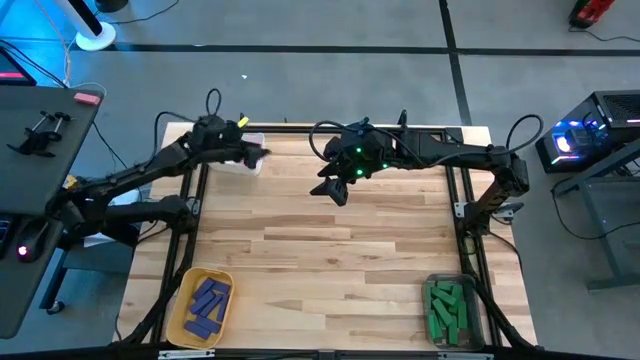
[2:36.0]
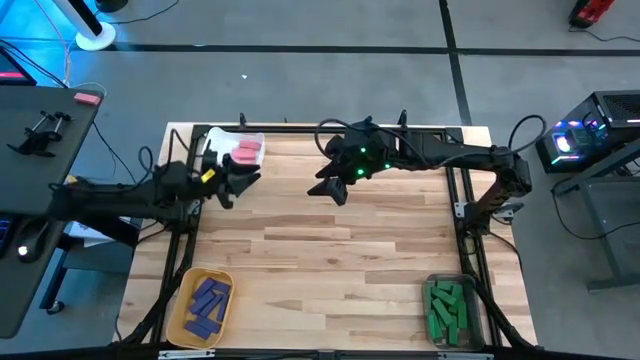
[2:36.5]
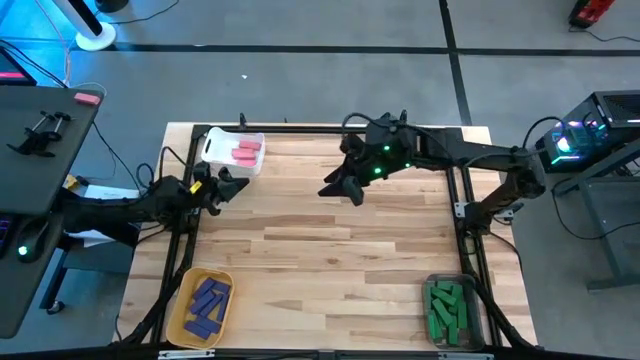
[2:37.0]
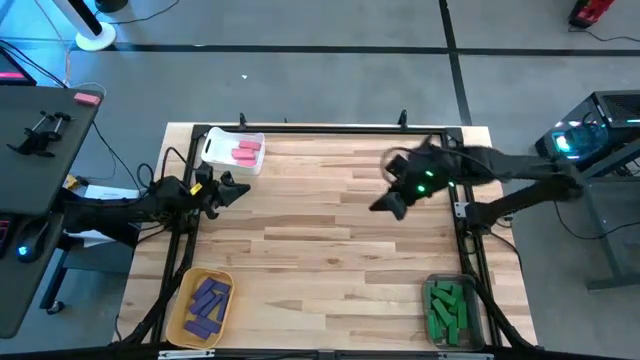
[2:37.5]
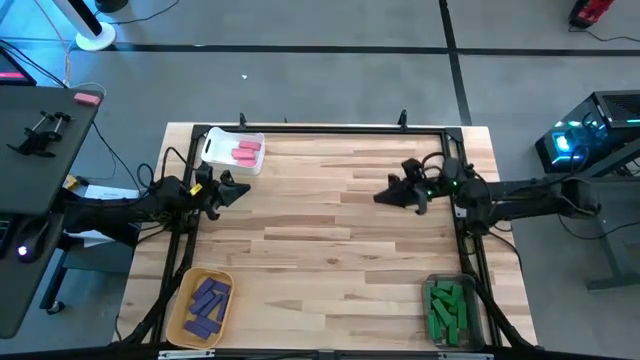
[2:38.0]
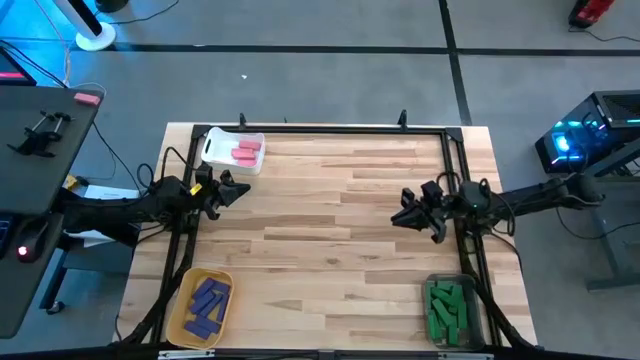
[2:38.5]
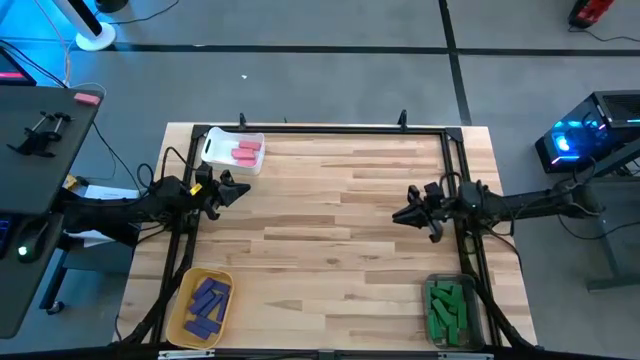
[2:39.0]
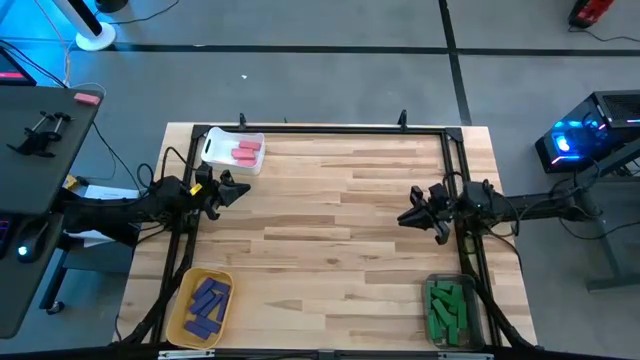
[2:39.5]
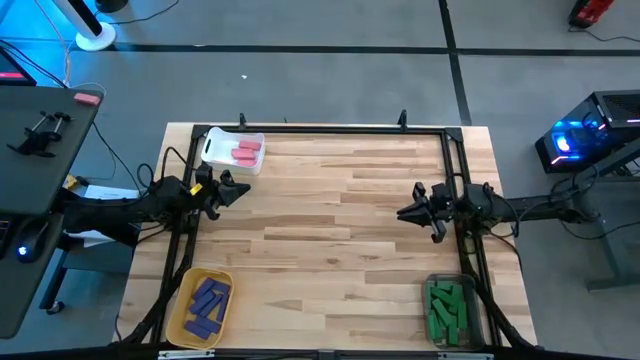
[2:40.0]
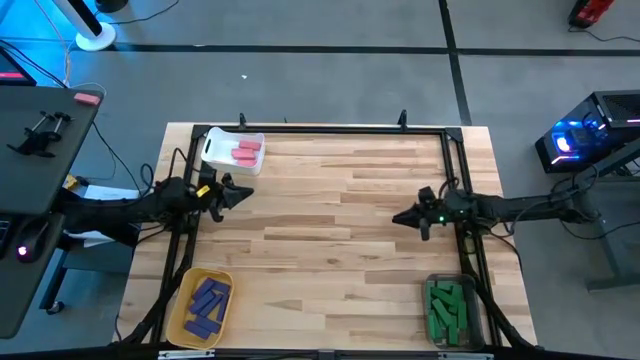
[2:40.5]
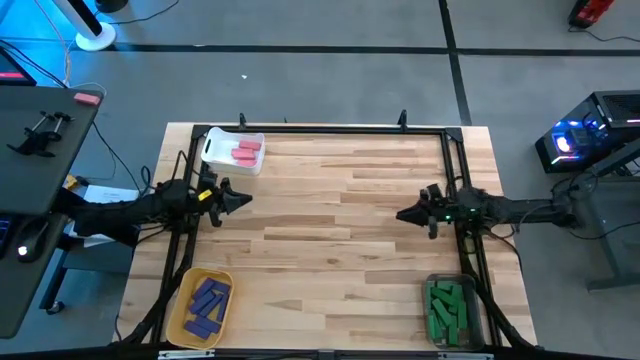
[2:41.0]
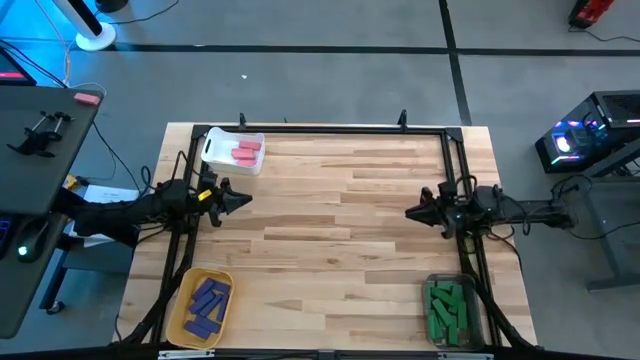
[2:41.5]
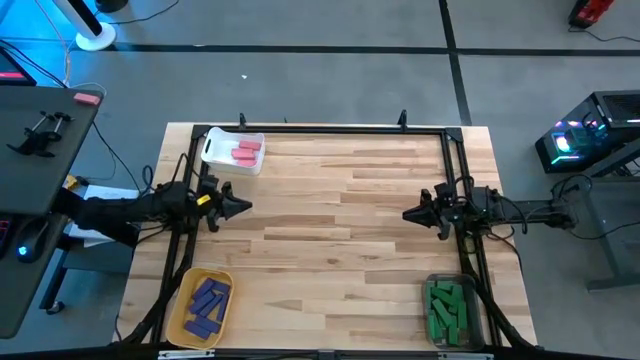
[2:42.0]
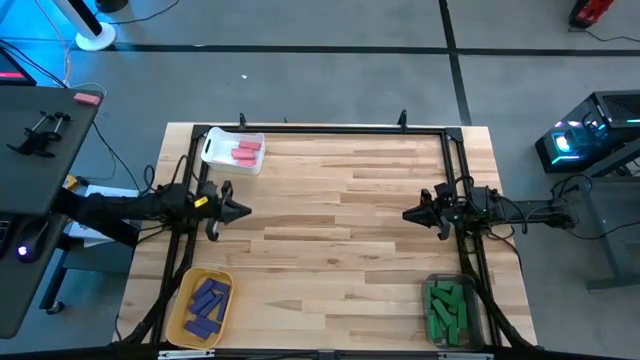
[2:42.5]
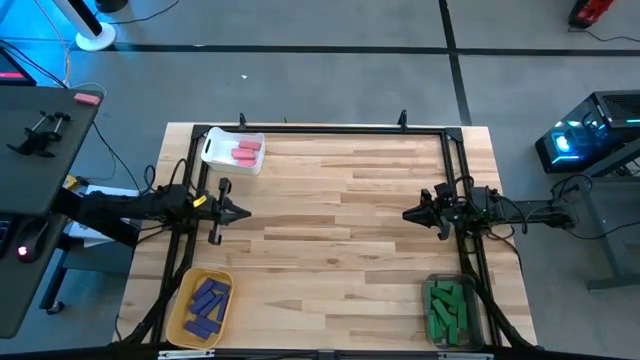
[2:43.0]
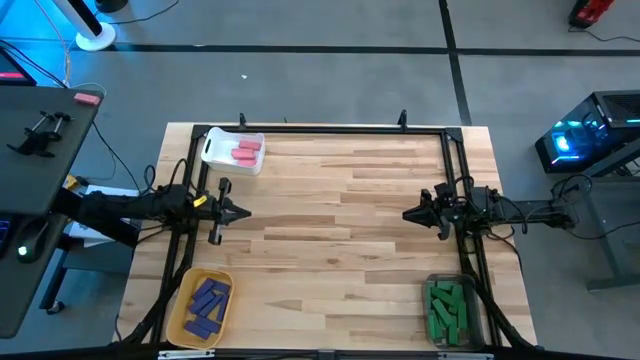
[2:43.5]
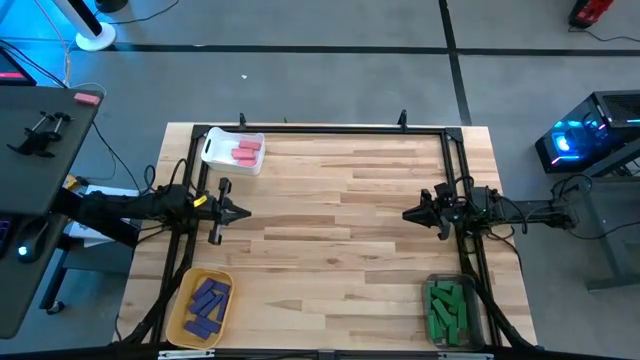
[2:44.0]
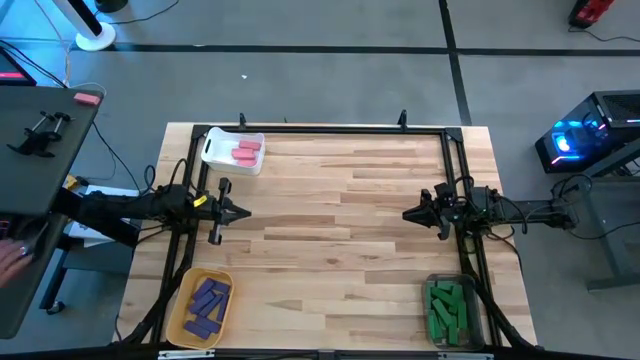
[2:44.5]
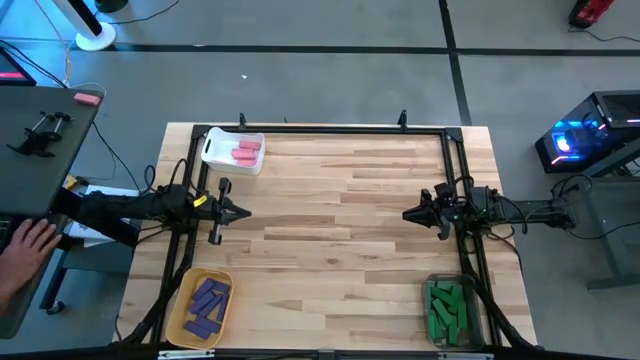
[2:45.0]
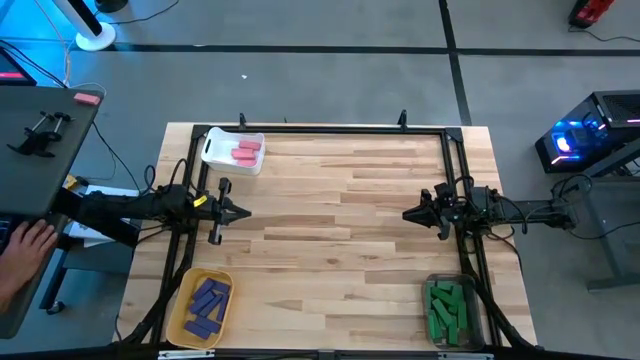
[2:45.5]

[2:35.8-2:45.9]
Task: Sort blocks
Return to Home Position

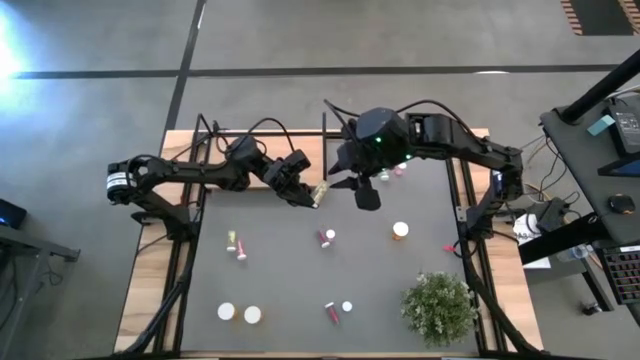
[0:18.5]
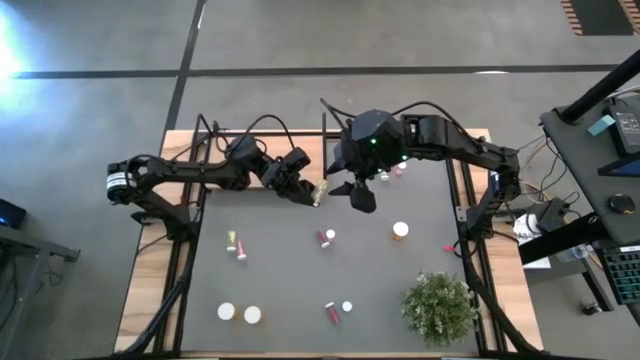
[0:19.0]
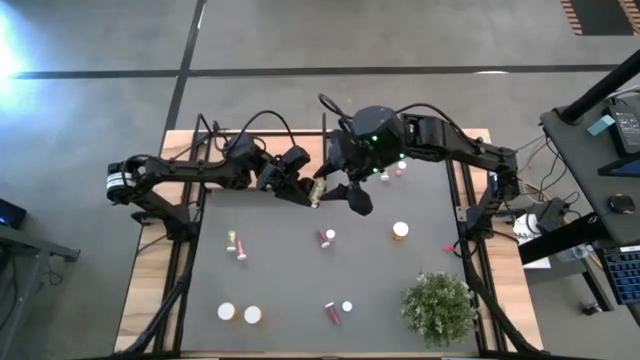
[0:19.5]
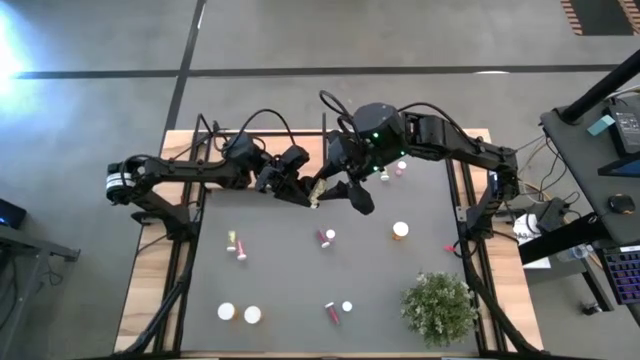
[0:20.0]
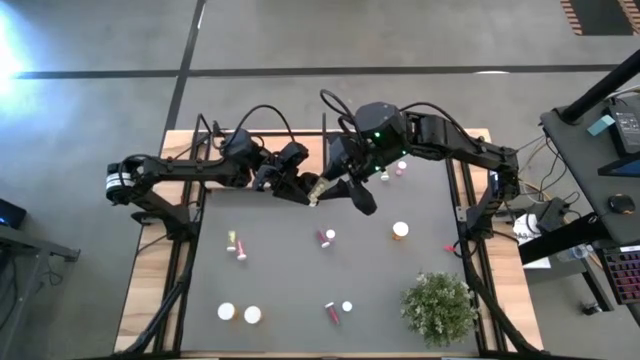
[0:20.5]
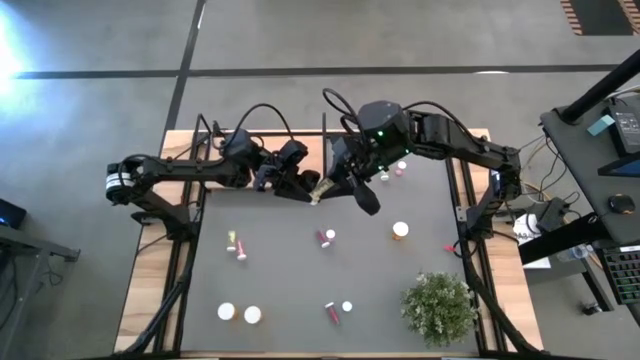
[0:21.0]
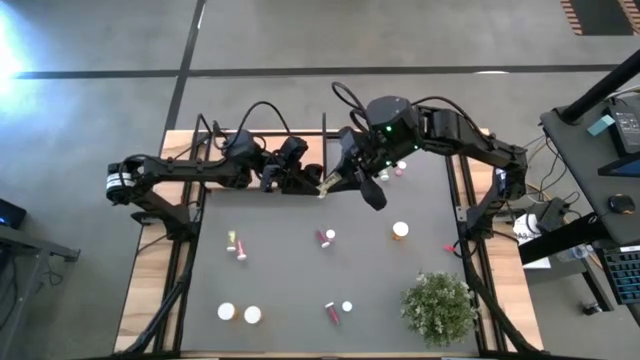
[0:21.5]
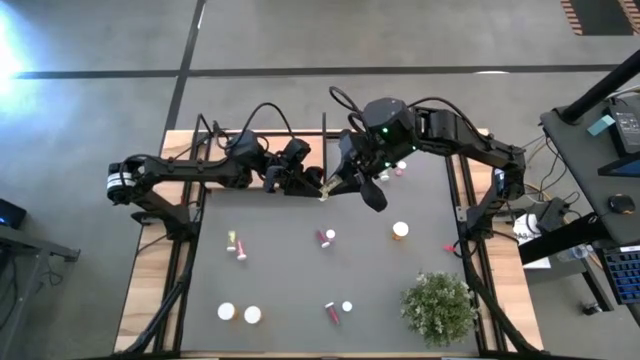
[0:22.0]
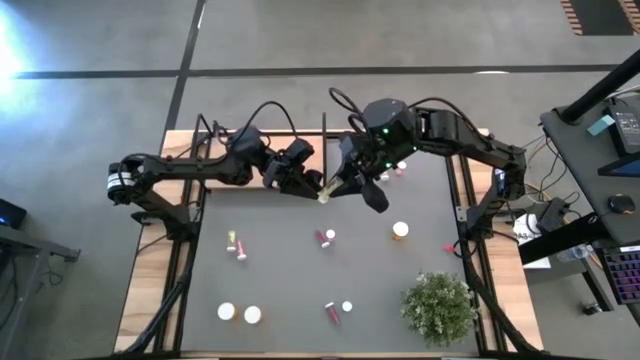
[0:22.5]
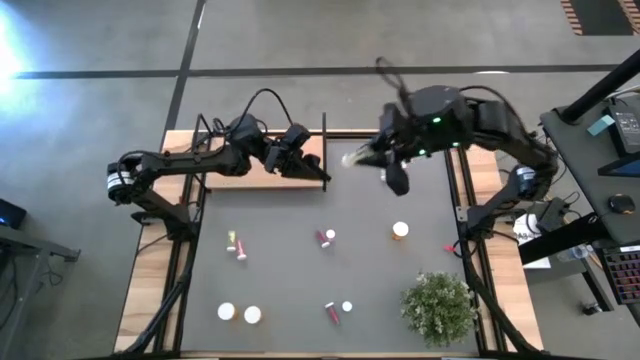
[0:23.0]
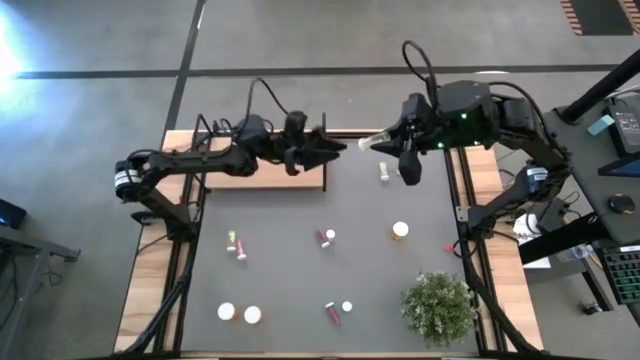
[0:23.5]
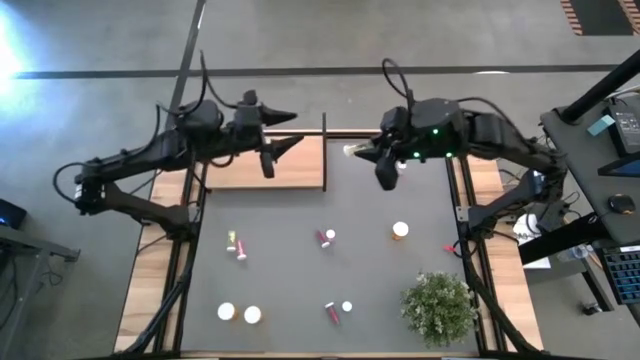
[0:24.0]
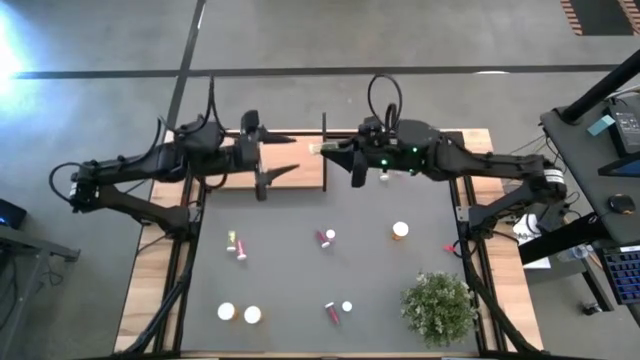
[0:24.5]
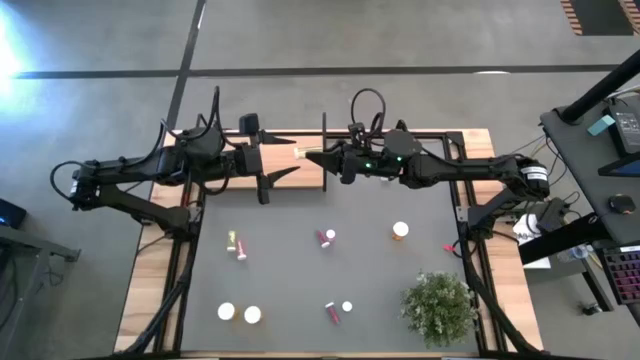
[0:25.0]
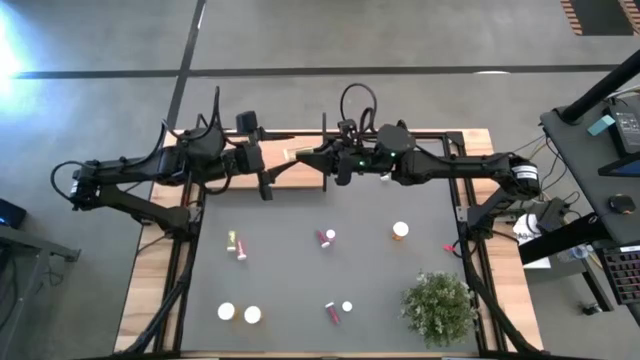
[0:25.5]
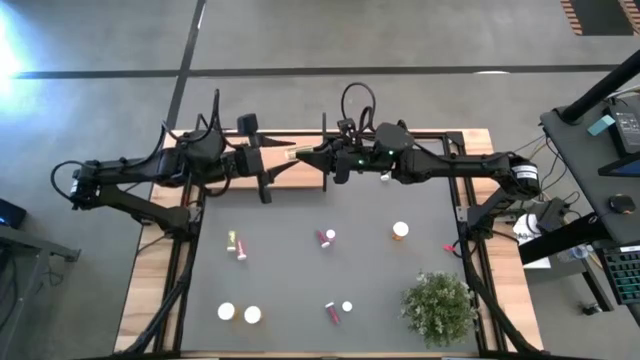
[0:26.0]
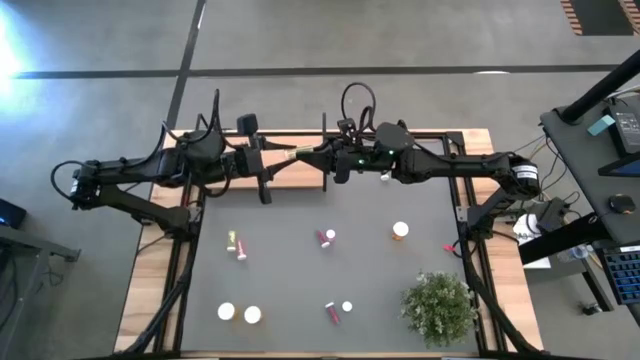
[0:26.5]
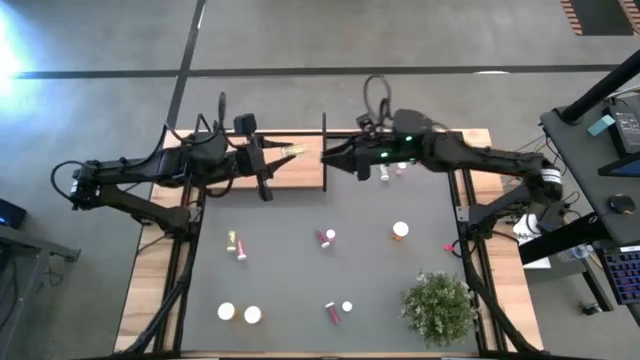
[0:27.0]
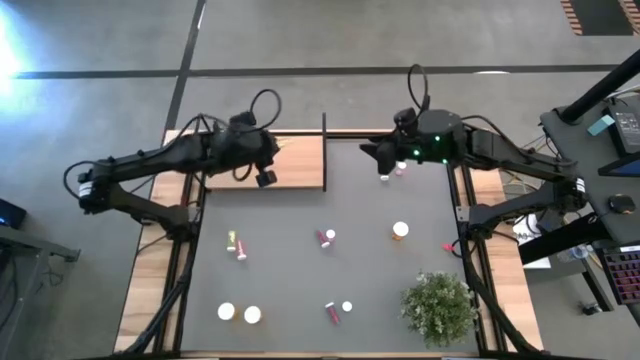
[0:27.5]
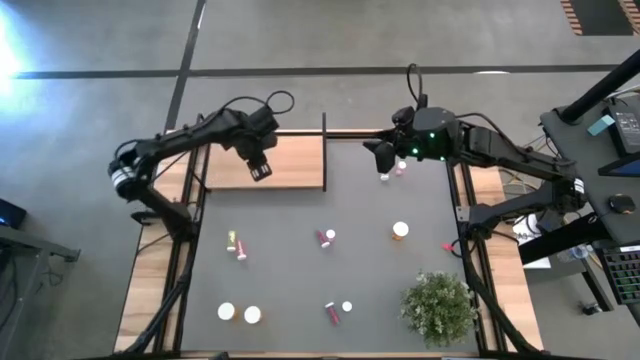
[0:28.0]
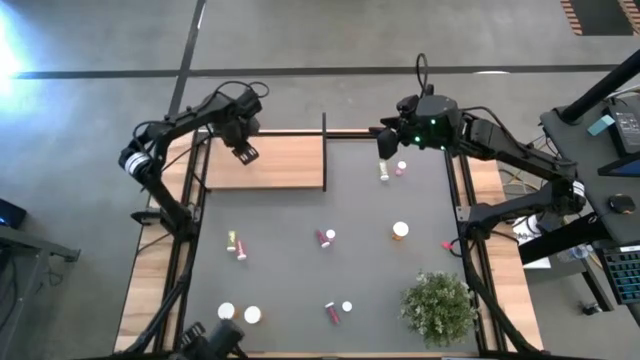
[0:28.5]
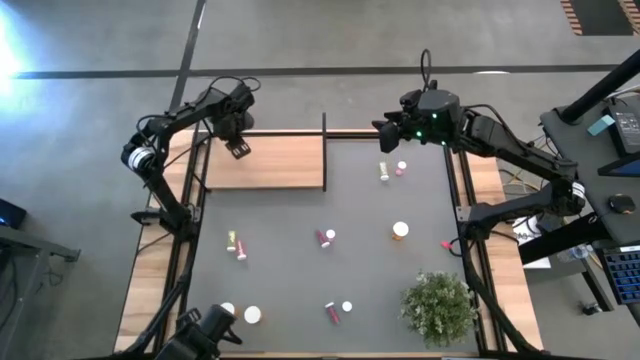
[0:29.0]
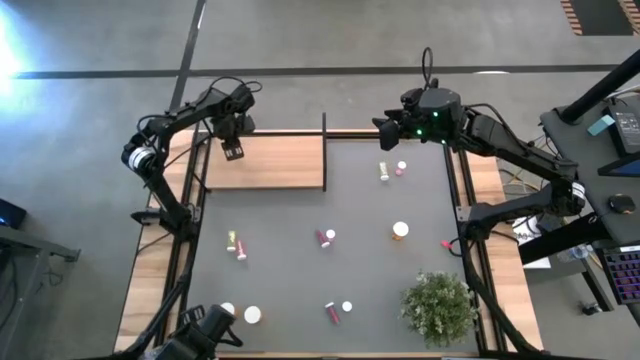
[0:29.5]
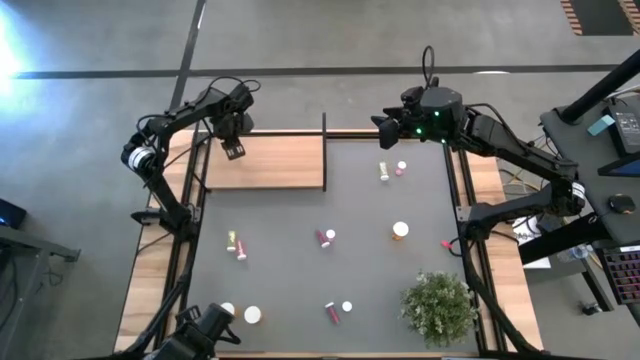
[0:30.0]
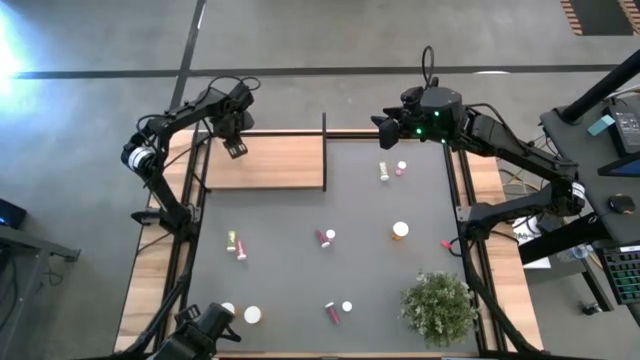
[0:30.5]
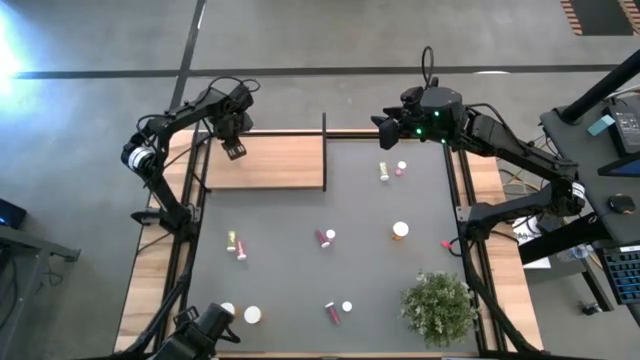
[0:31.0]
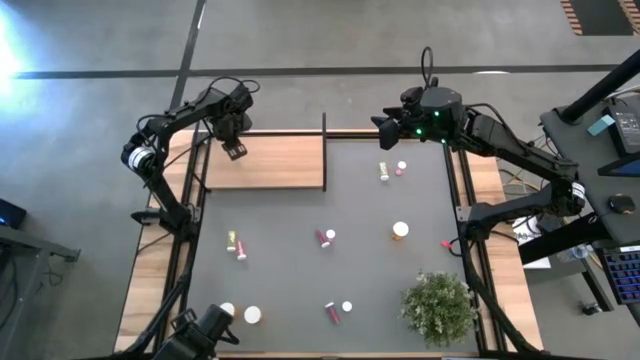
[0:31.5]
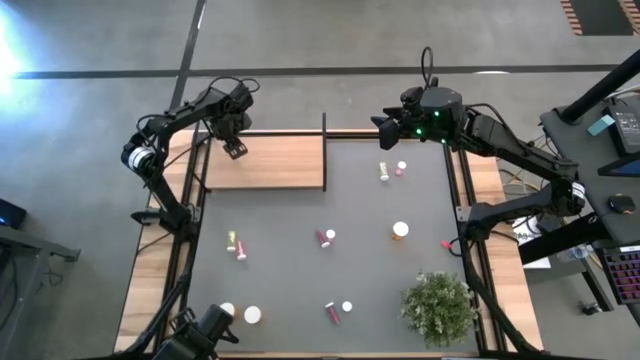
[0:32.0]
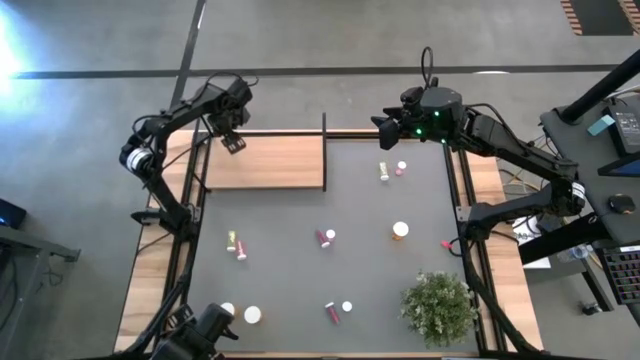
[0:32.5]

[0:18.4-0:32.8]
Task: Pick and place medicine bottles onto shelf by color
Put the middle yellow pill bottle on the shelf
